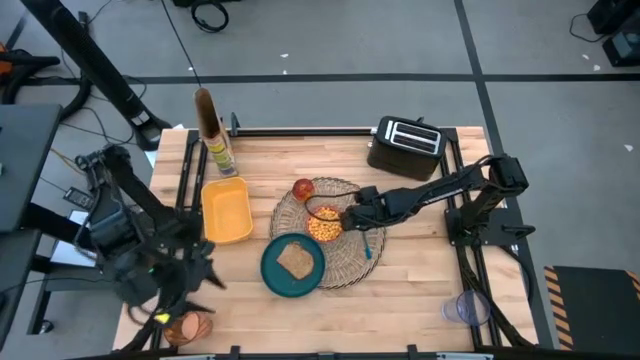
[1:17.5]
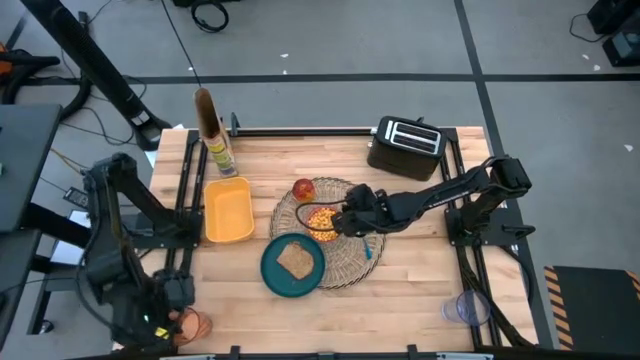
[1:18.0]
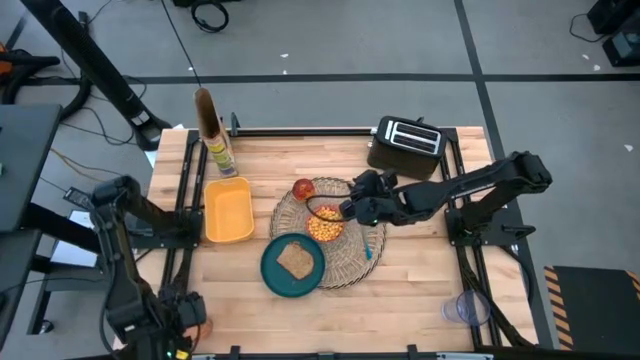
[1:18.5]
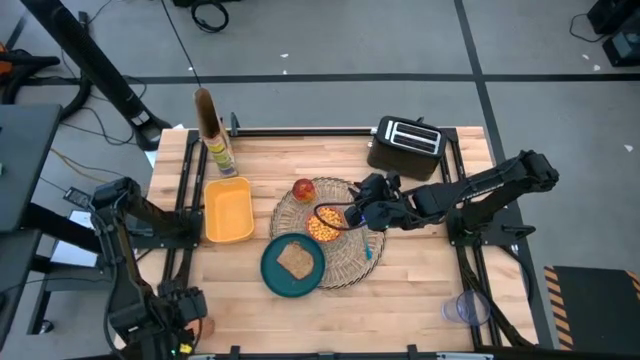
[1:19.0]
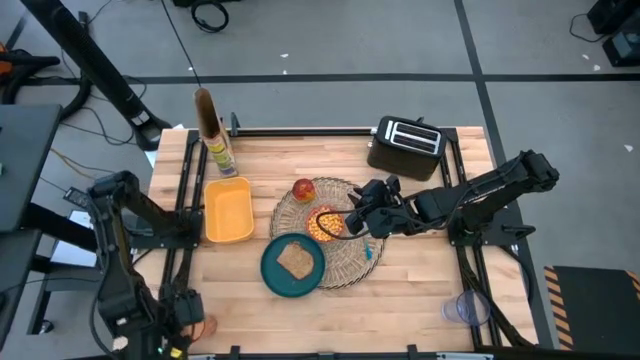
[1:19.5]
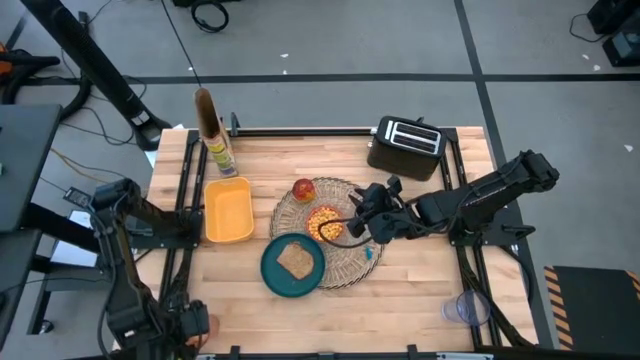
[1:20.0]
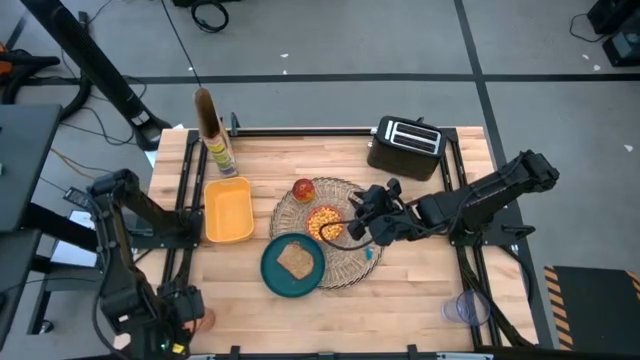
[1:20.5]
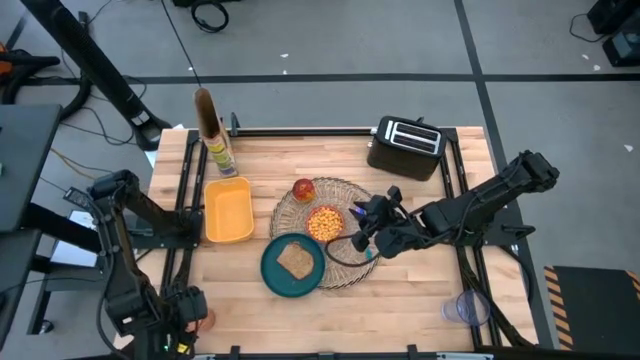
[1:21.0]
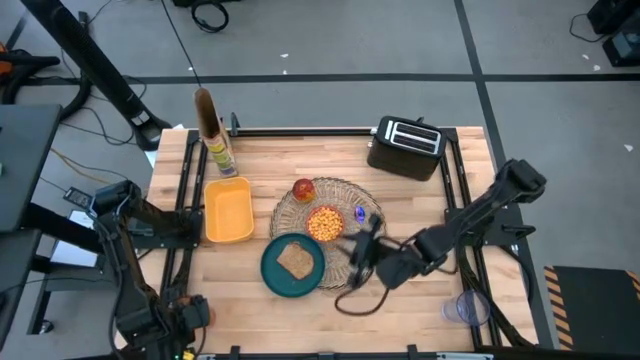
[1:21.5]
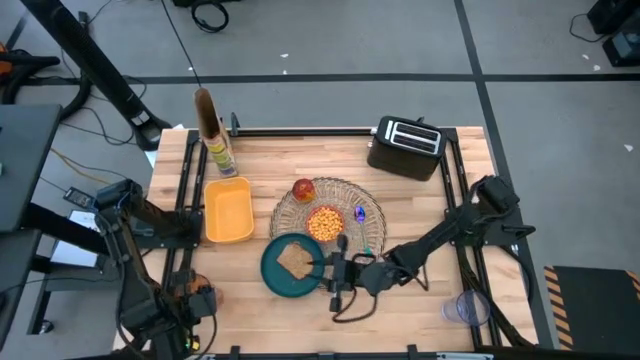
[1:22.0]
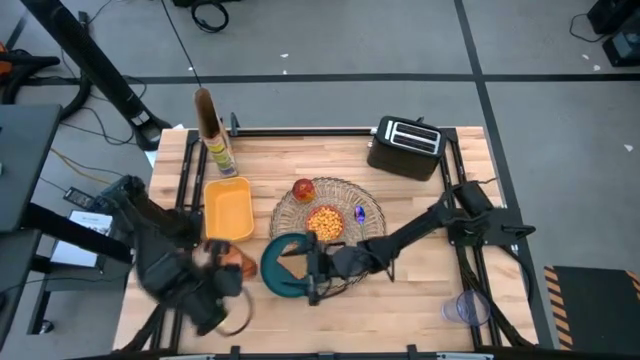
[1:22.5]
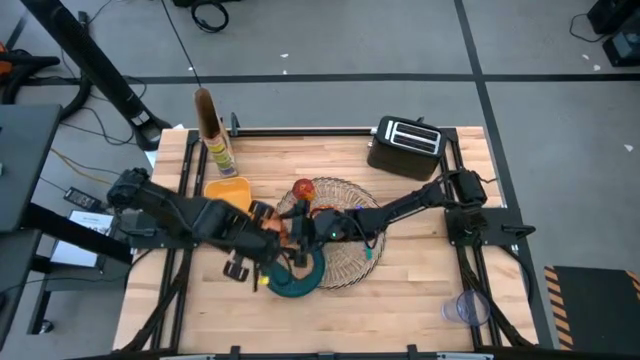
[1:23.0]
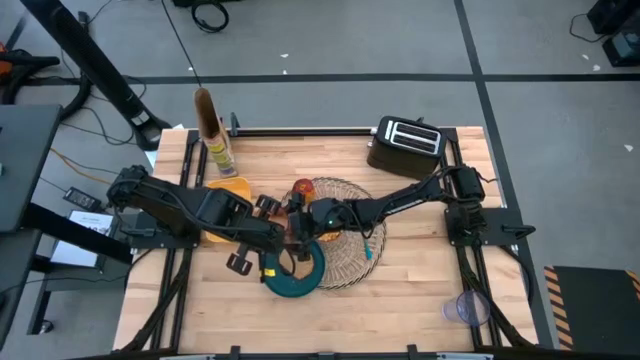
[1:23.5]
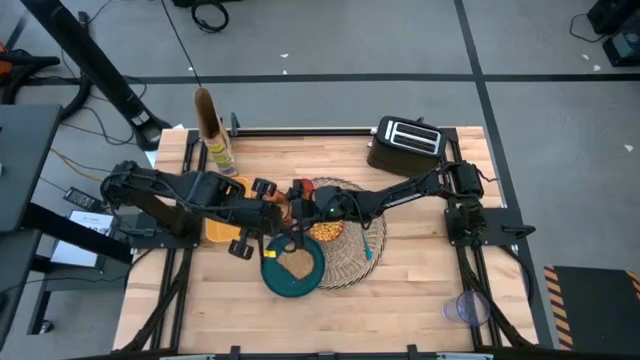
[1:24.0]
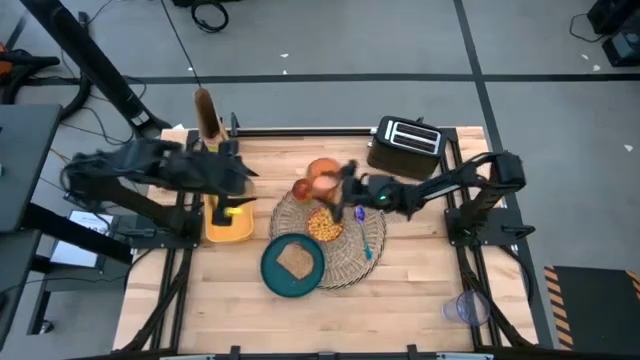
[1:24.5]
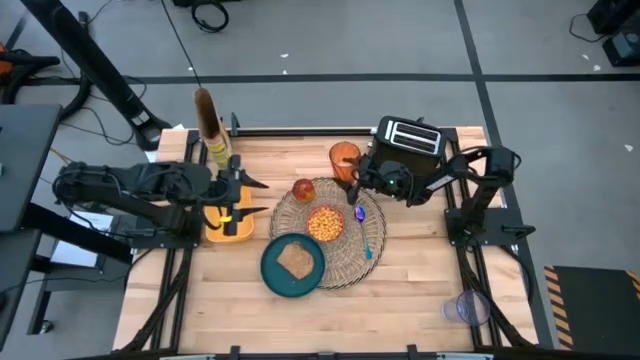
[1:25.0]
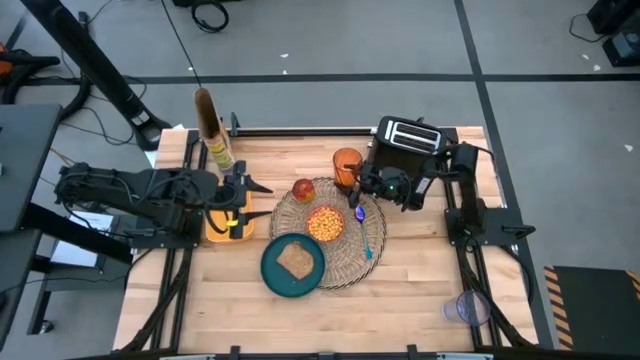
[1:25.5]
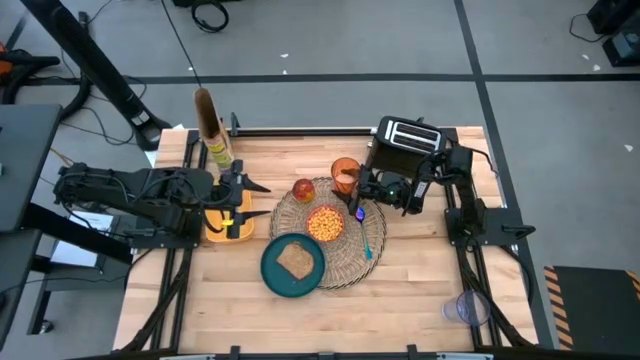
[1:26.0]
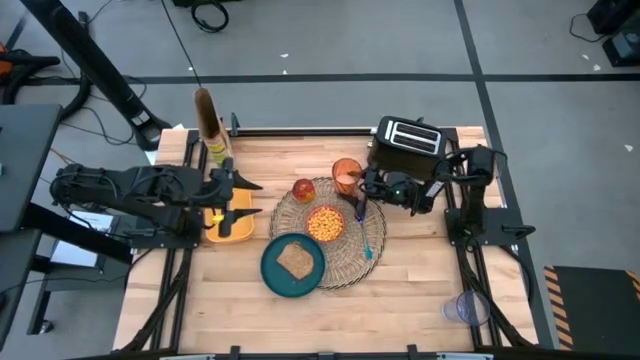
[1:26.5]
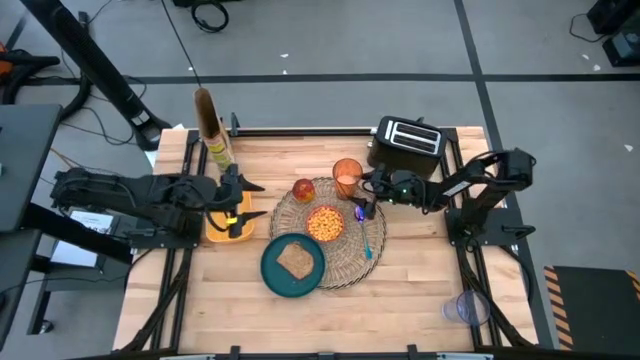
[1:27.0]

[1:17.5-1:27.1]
Task: Arrange a breakfast setting
Put the brown cup of milk to the top of the blue spoon on the brown table mat

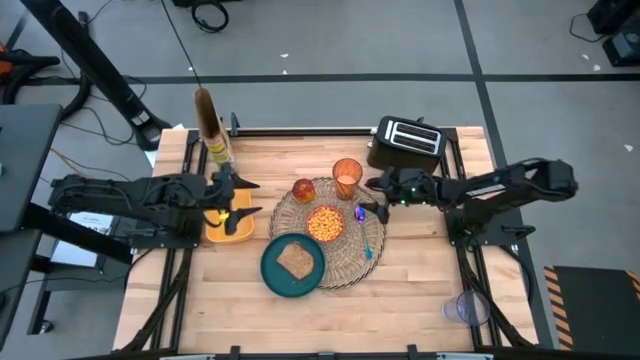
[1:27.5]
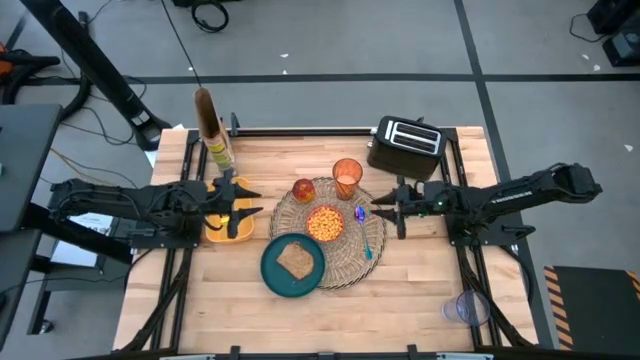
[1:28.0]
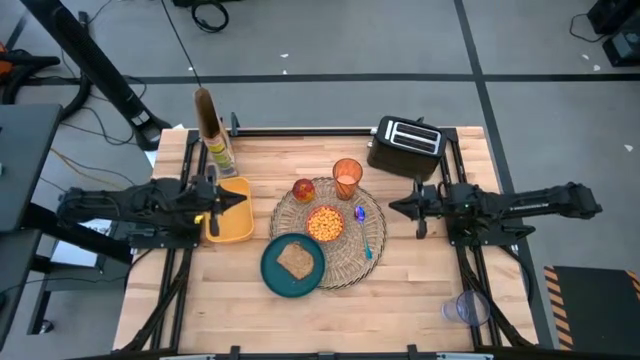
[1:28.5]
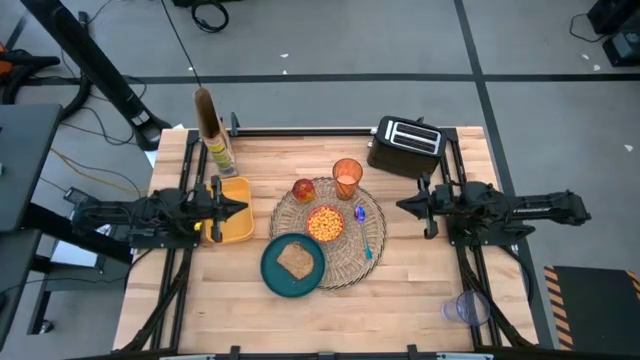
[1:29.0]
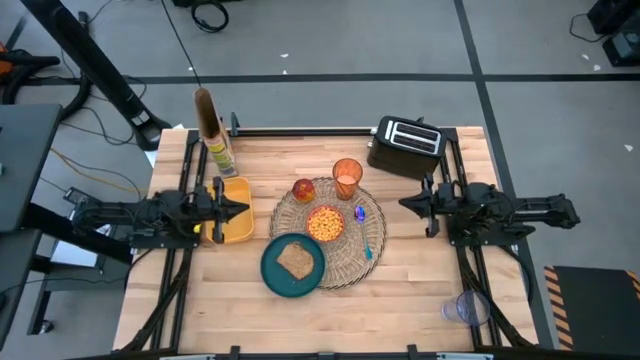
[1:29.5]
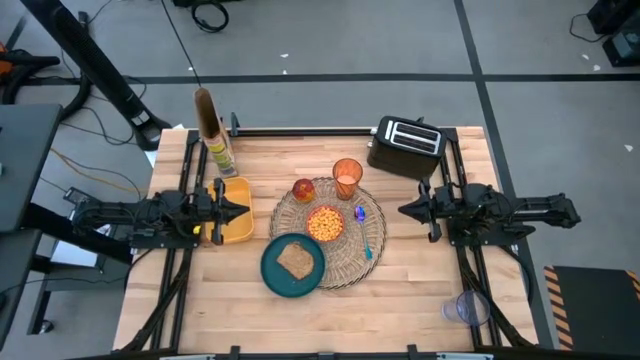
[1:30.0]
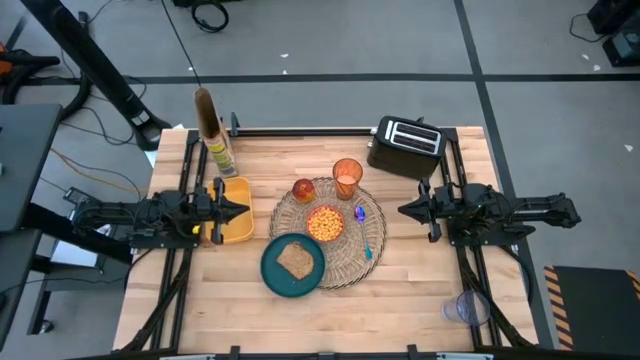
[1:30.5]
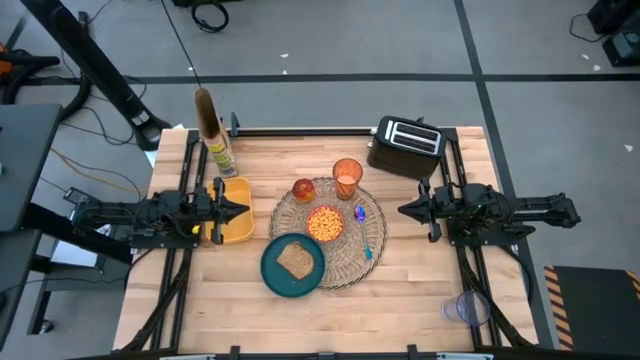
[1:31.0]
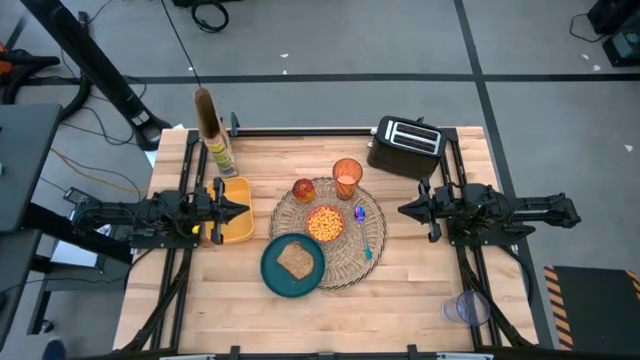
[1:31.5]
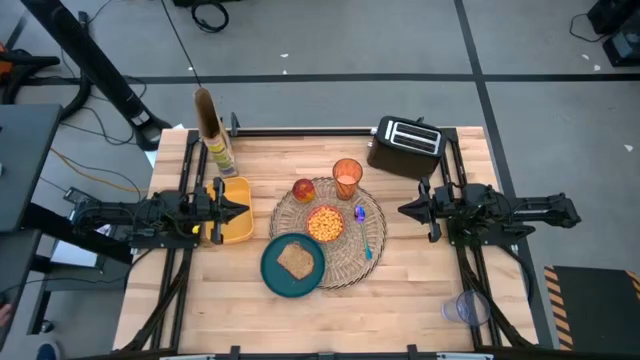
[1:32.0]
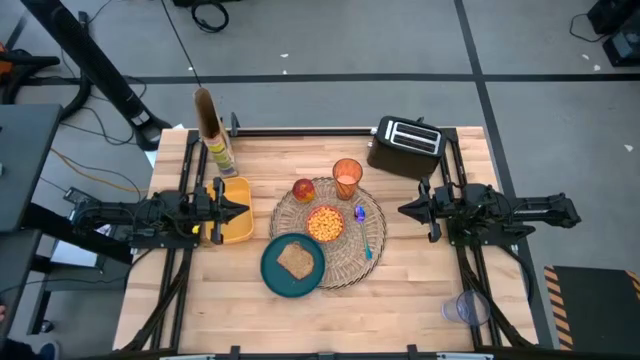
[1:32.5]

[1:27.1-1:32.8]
Return to Home Position

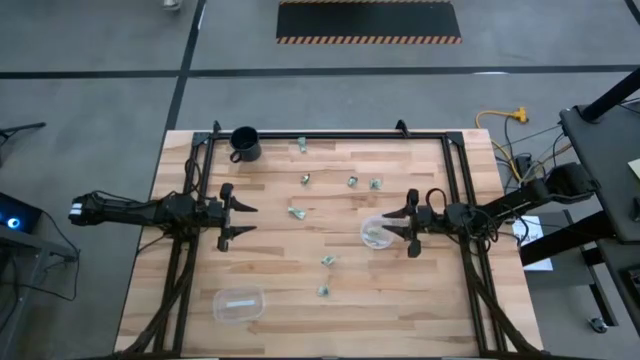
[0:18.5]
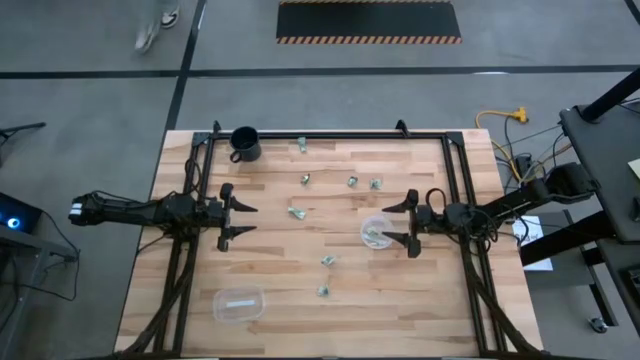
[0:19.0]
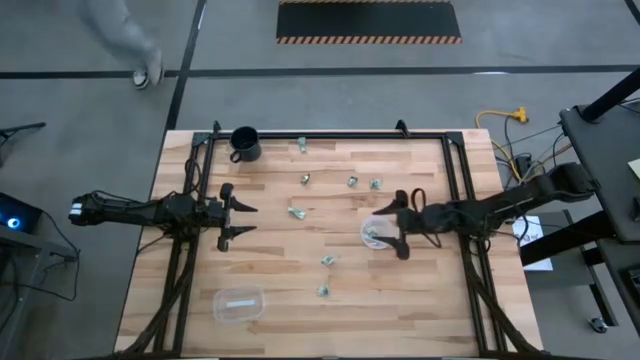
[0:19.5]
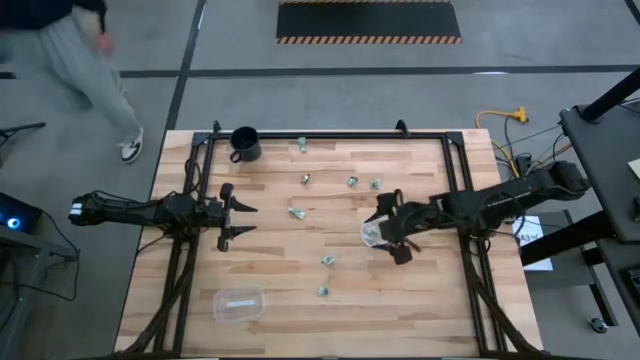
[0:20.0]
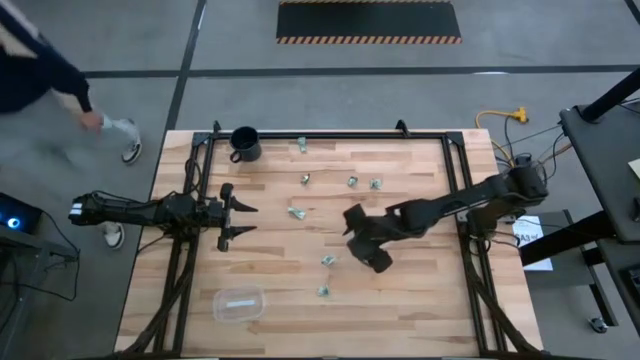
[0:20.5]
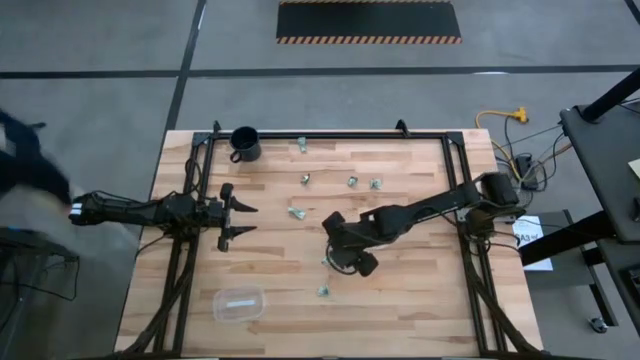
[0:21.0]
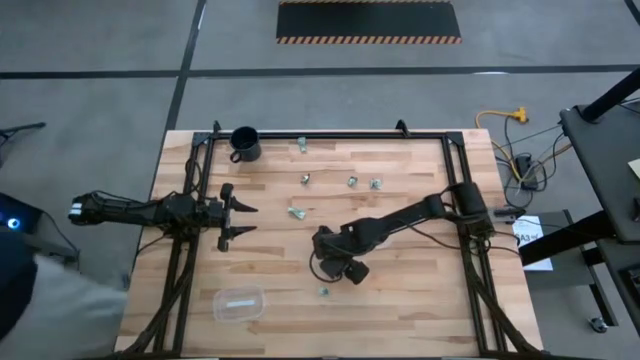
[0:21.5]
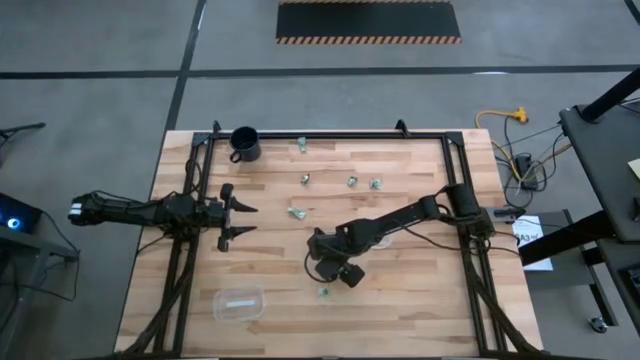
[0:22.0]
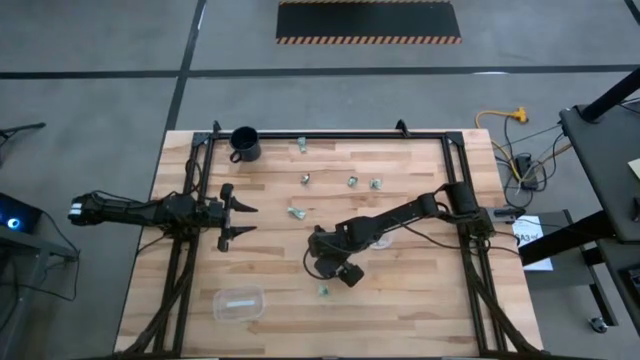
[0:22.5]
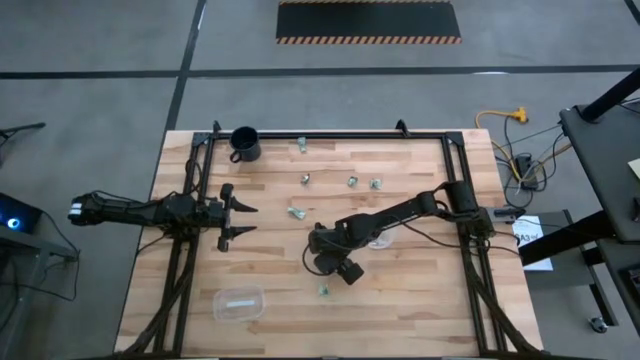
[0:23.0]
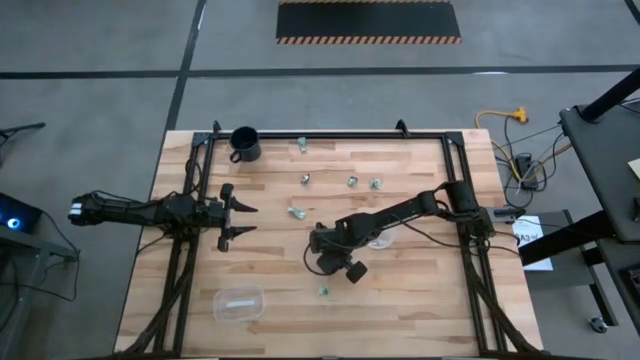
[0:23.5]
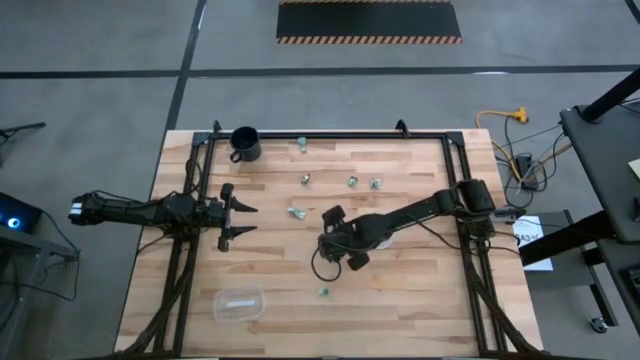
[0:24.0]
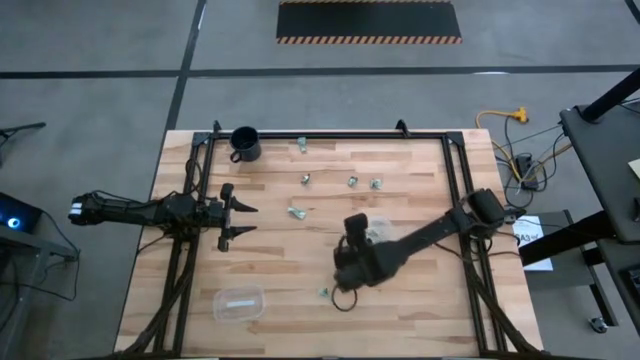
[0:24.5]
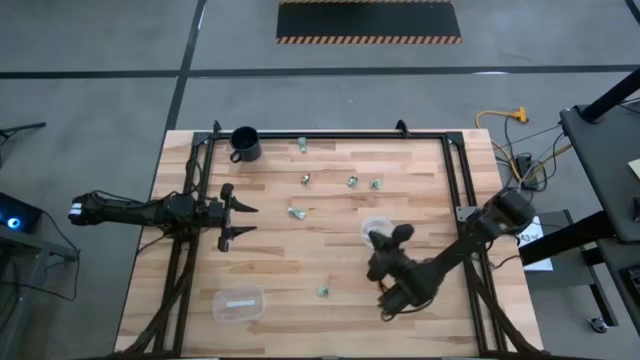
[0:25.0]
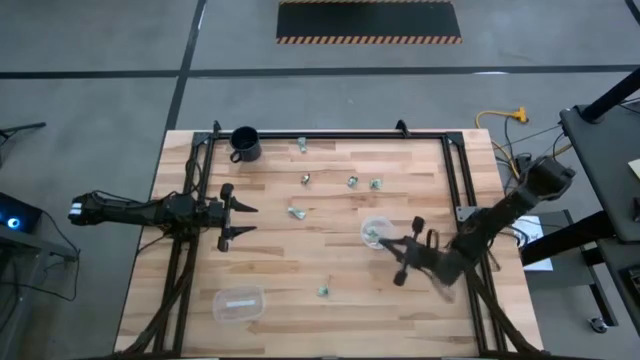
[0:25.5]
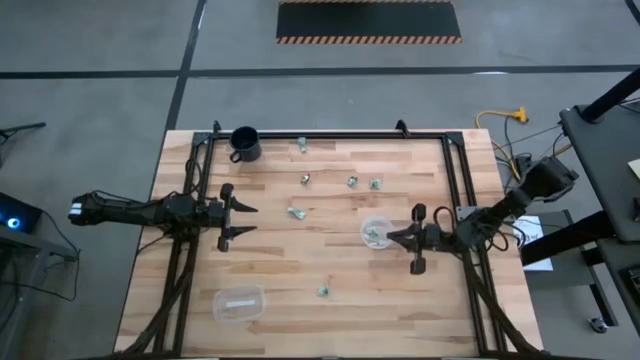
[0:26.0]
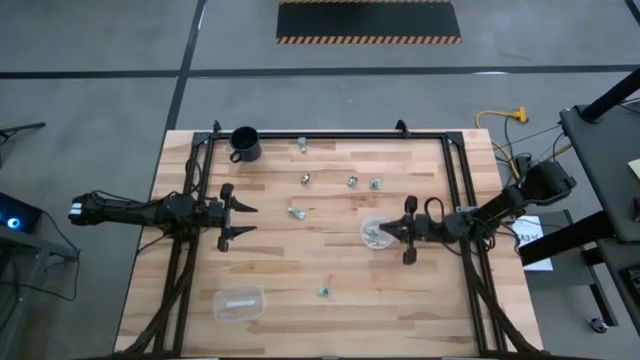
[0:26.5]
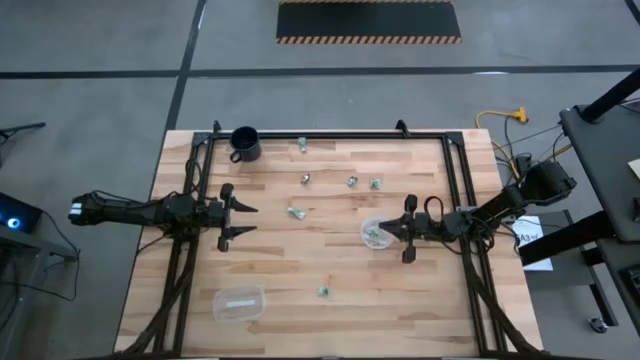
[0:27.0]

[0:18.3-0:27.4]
Task: Pick and place Stevia / Truvia into bins
Put the white stevia packet into the right transparent container
